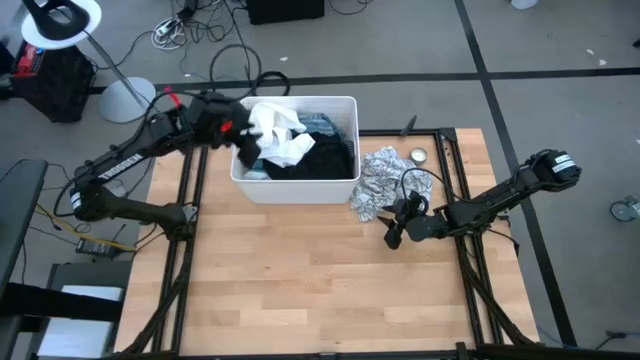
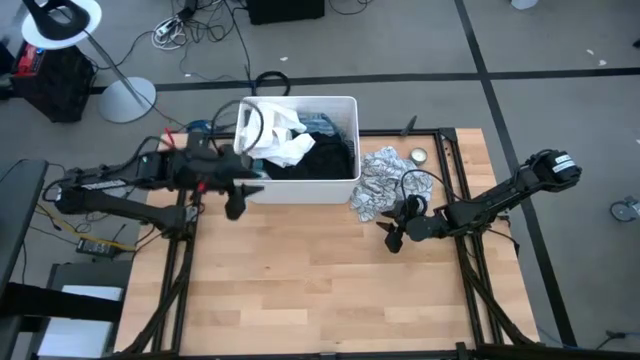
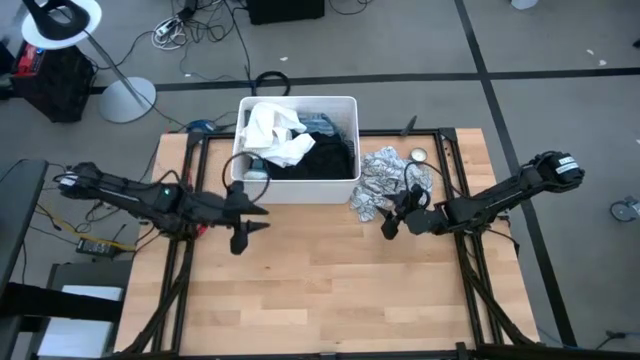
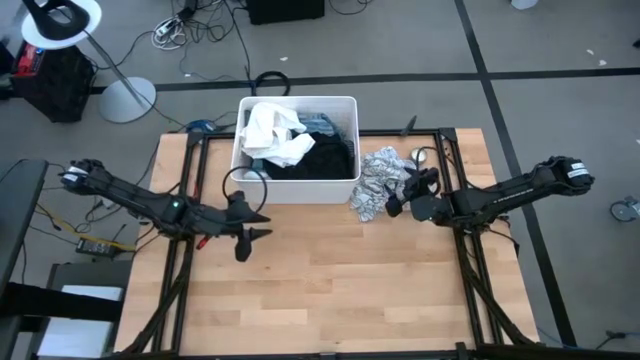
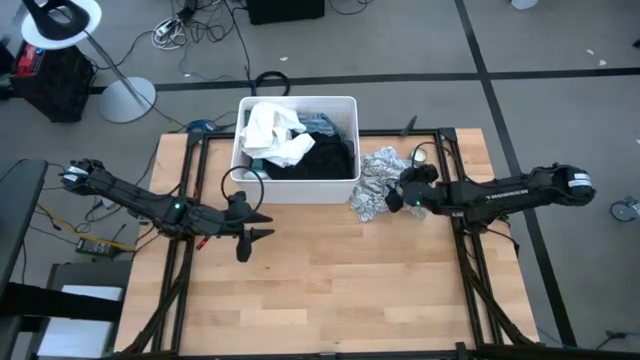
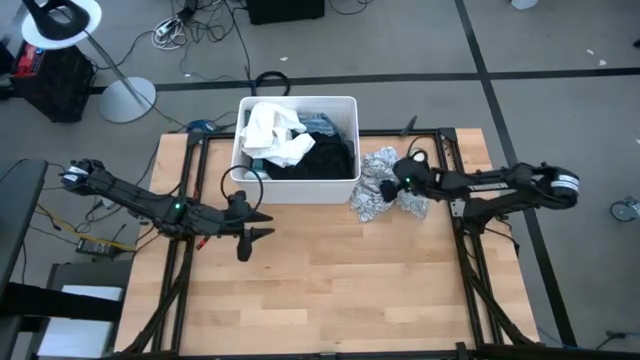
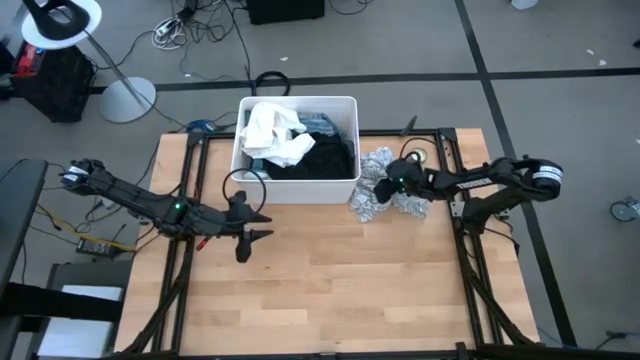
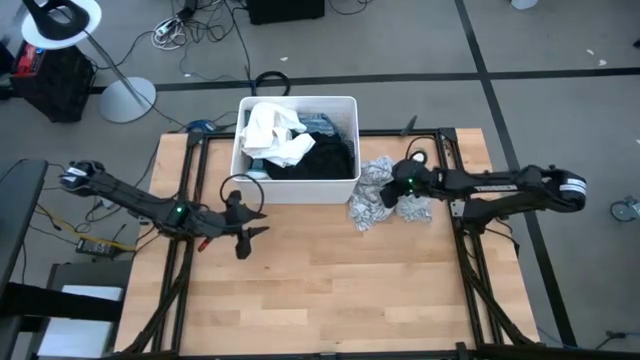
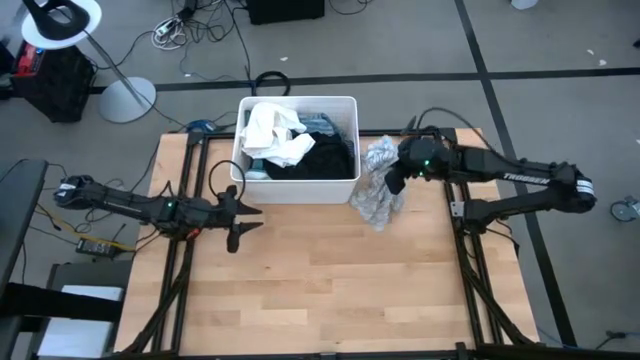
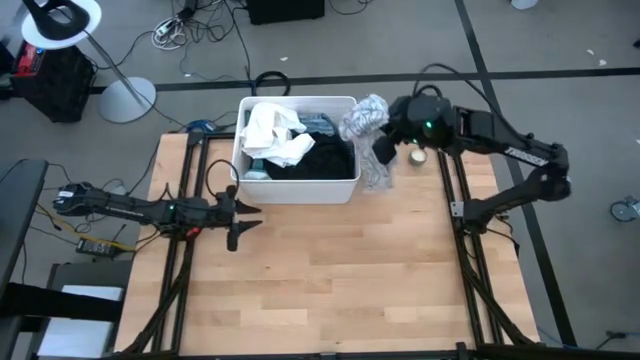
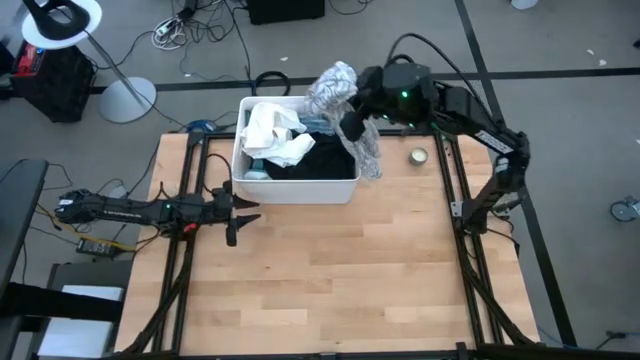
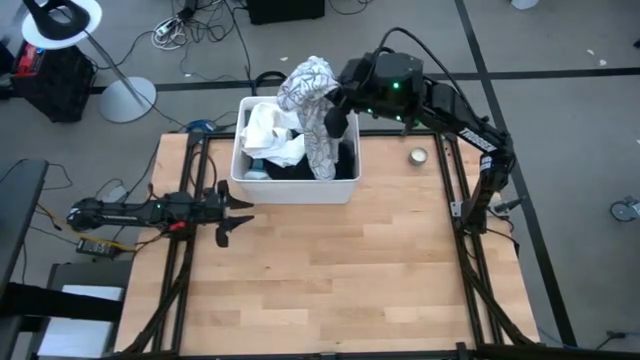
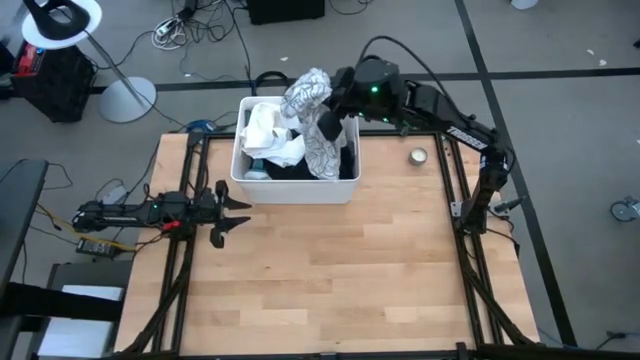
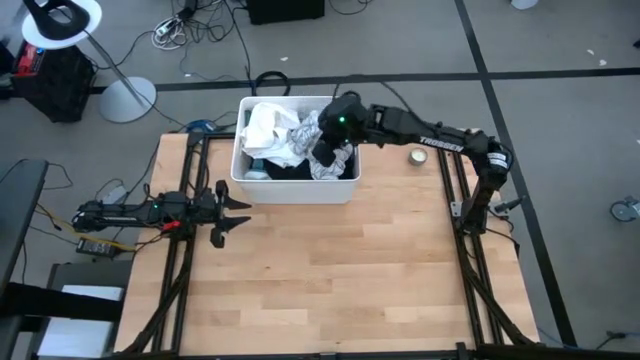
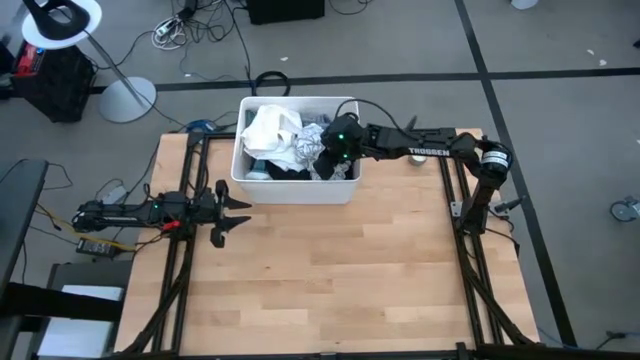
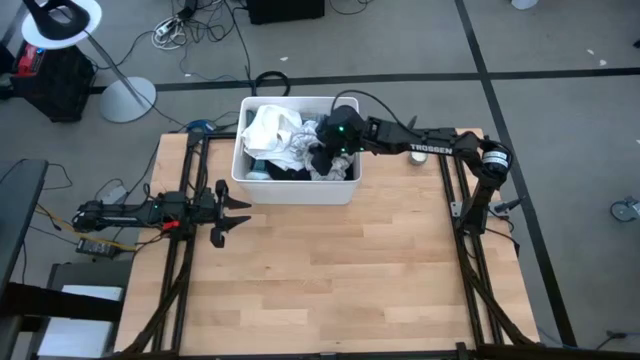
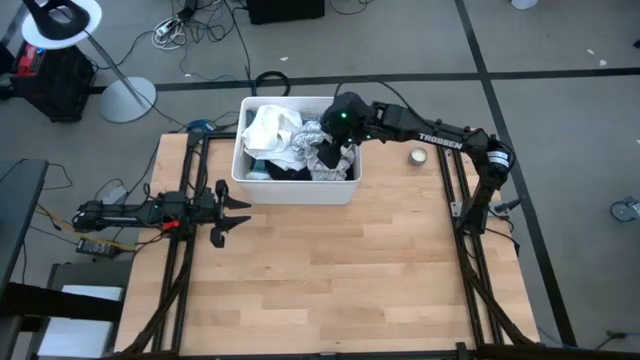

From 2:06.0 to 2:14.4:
Task: Sort clothes
Put the white patterned shirt into the white laundry bin

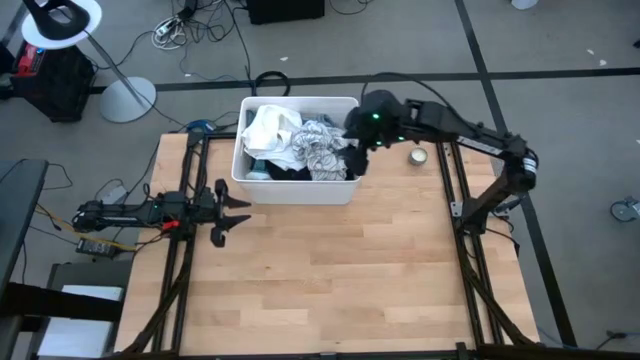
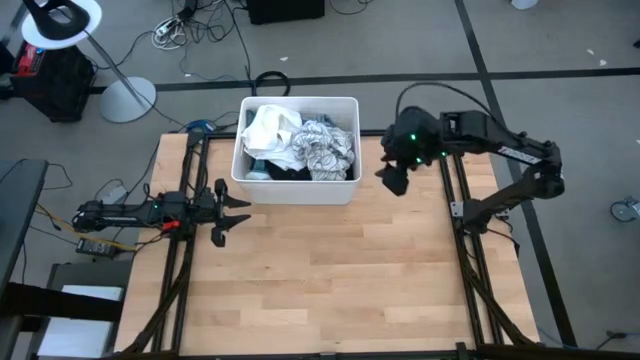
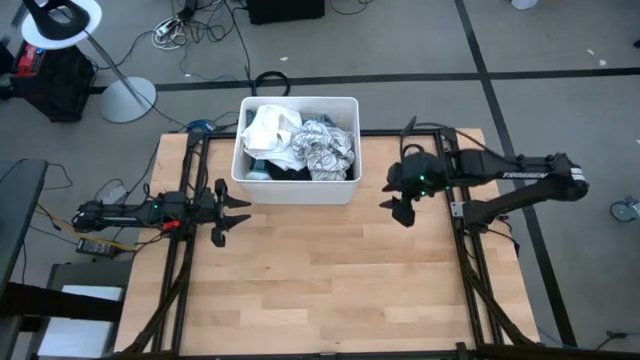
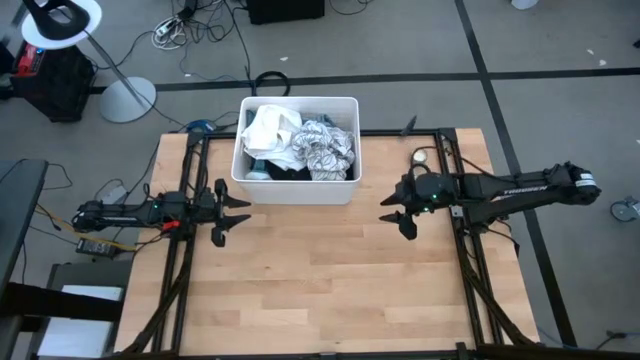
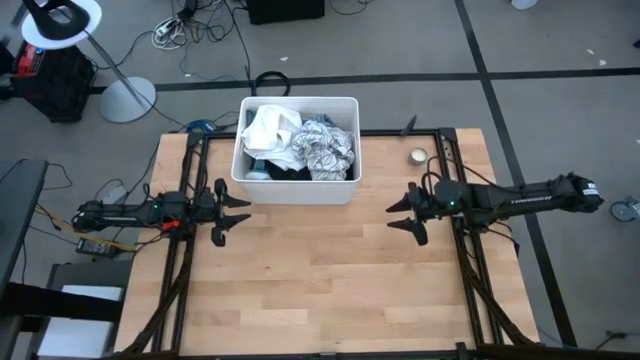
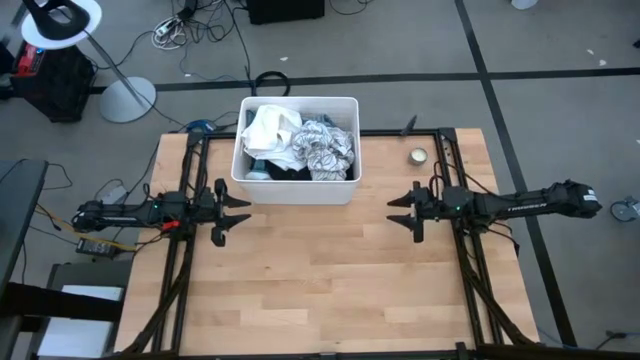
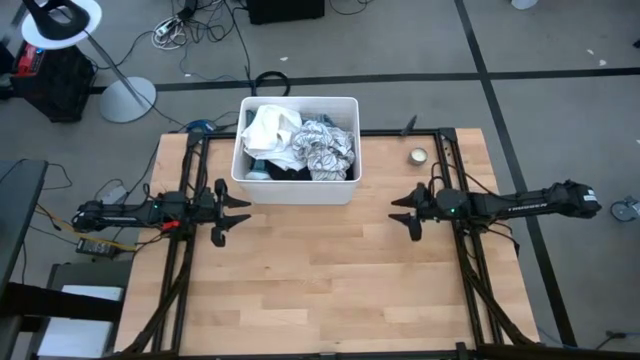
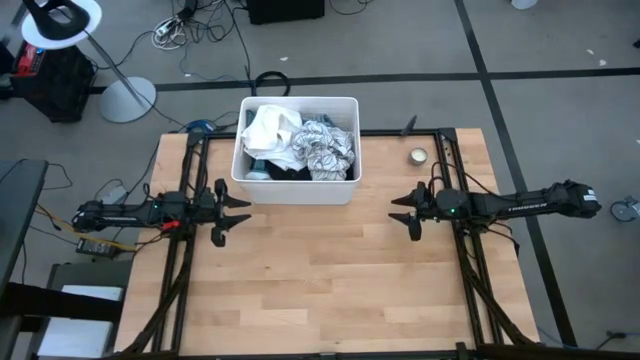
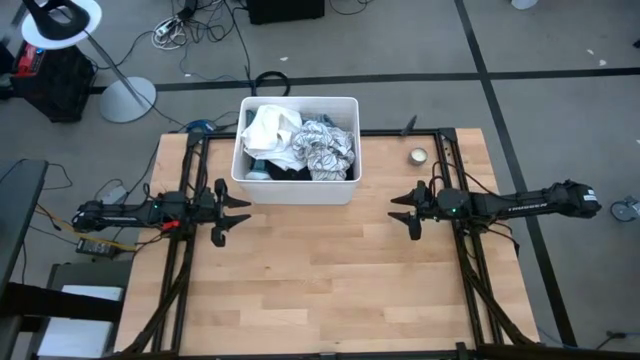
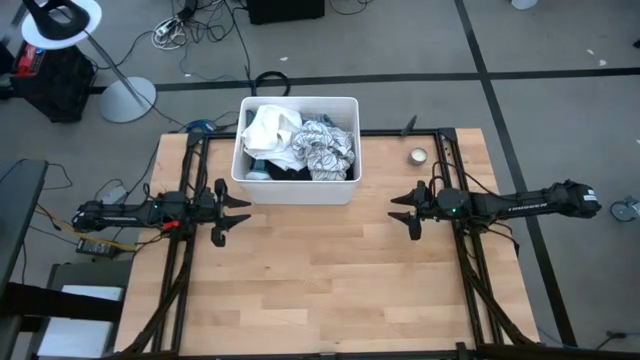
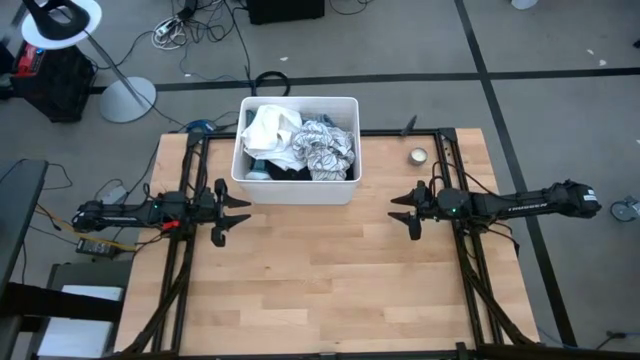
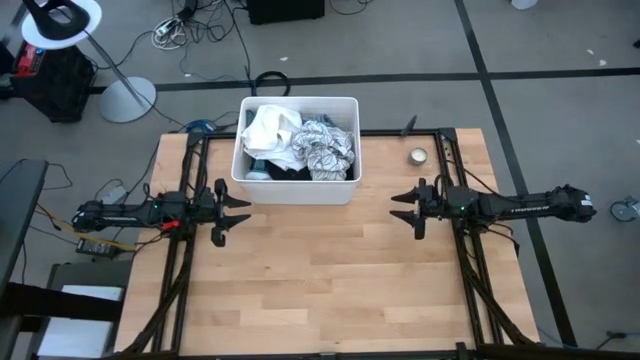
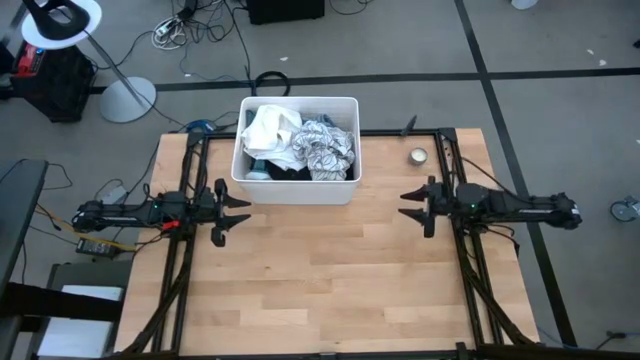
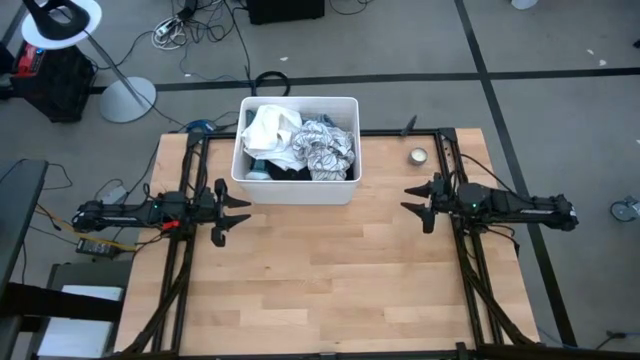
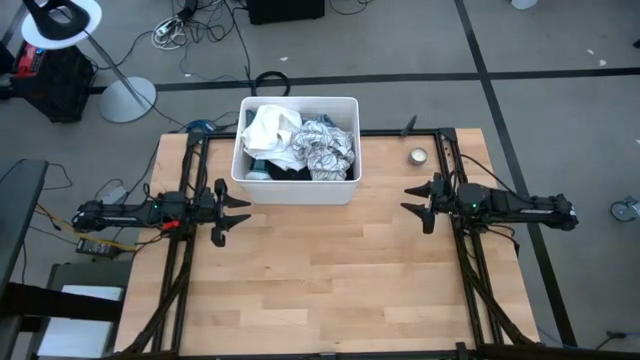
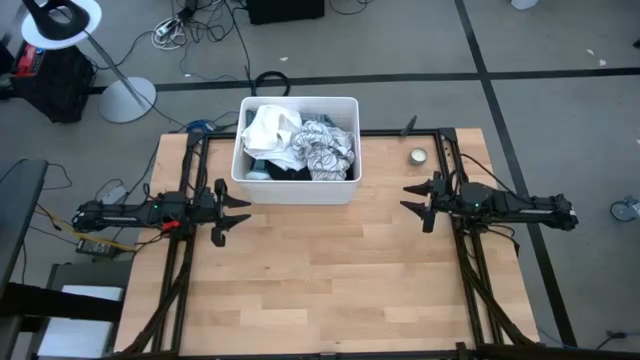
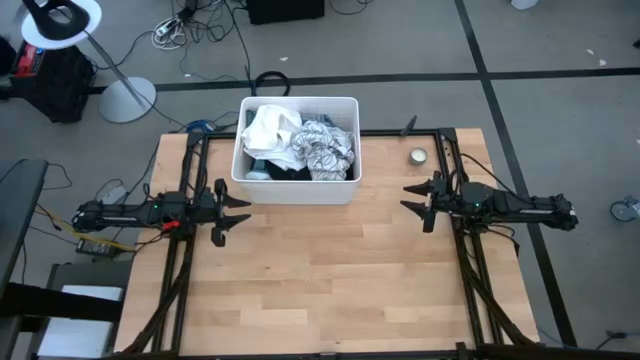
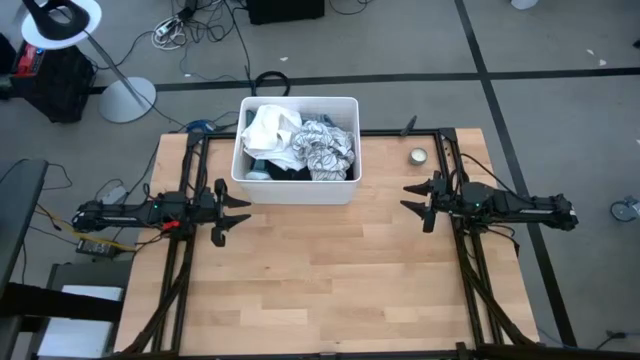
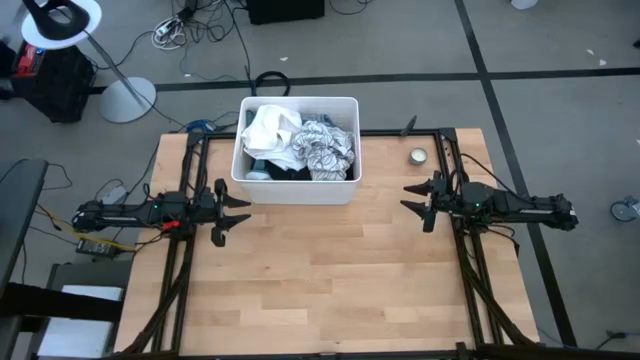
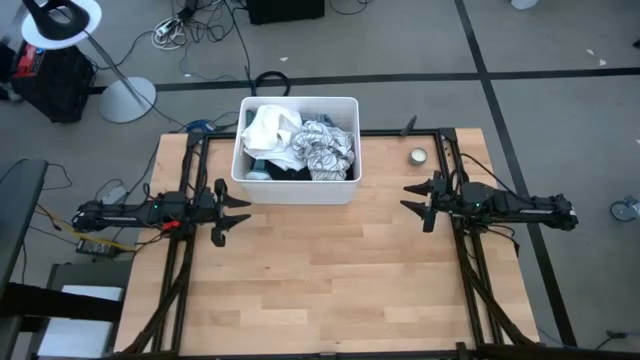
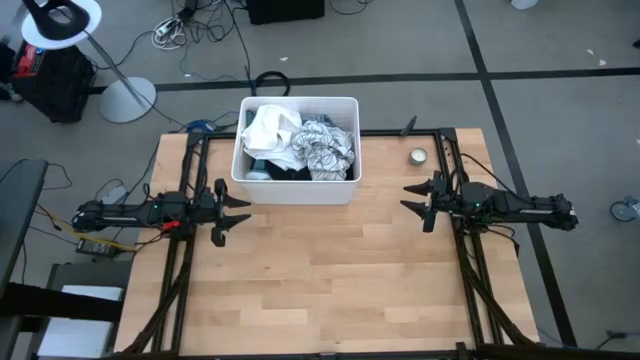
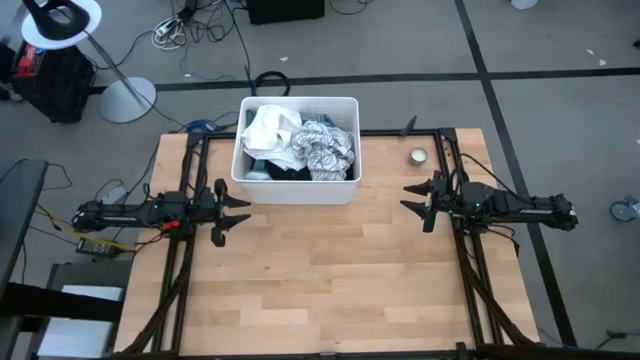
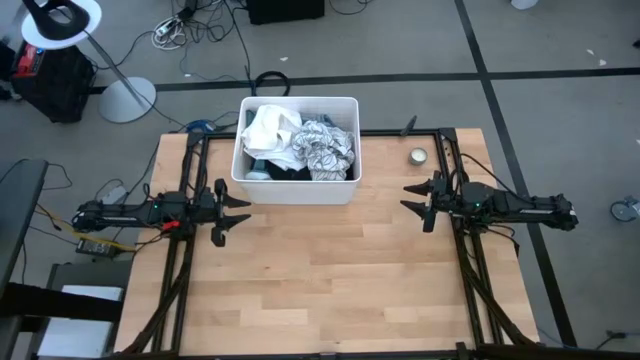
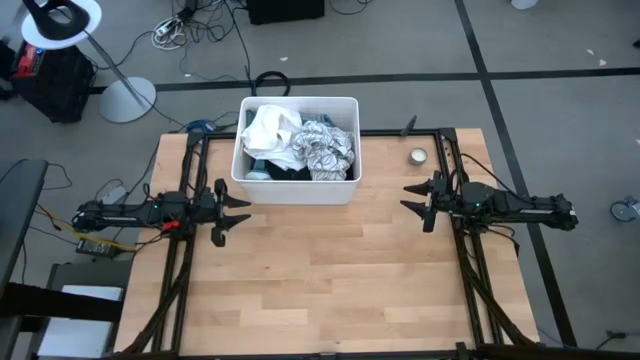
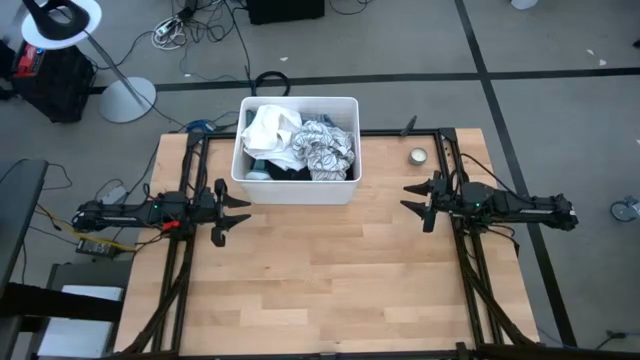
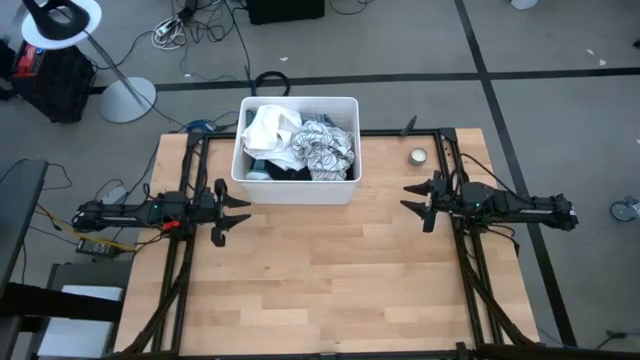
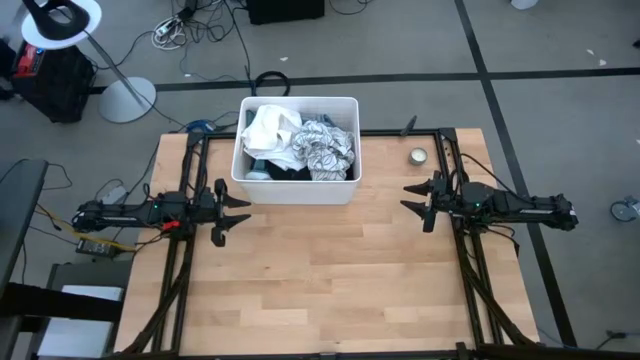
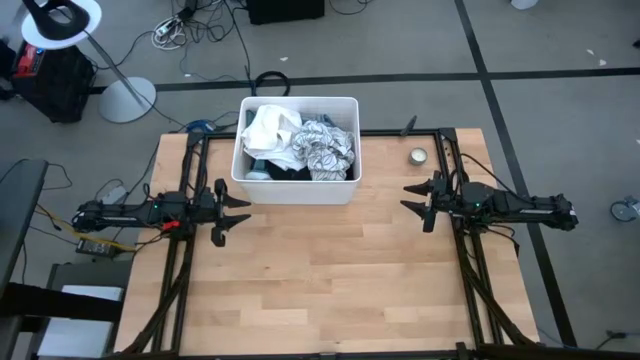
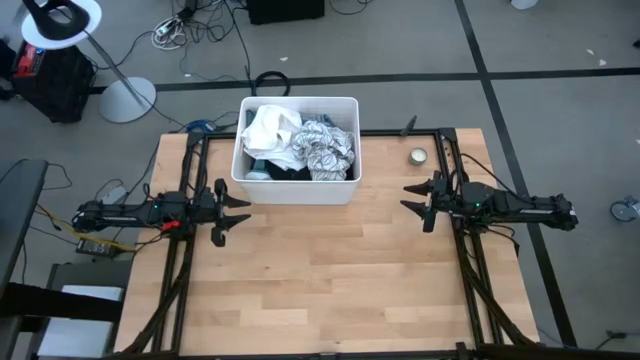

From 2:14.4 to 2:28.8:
Return to Home Position
